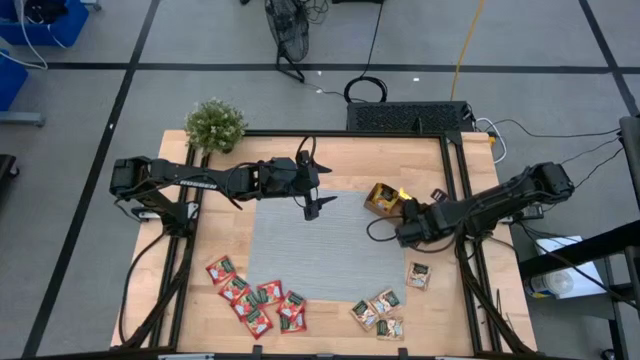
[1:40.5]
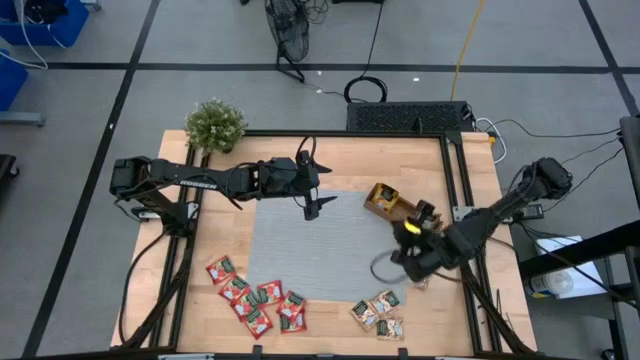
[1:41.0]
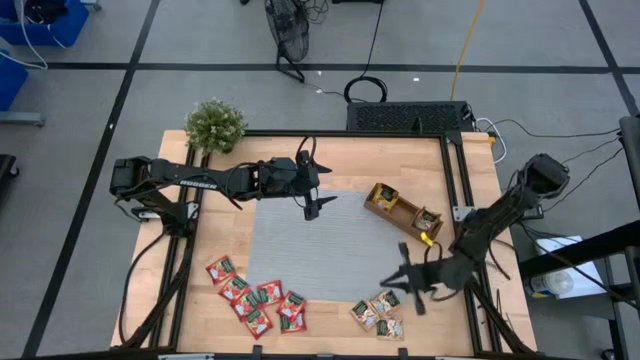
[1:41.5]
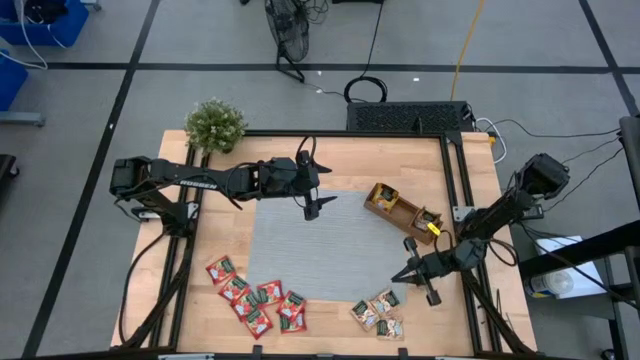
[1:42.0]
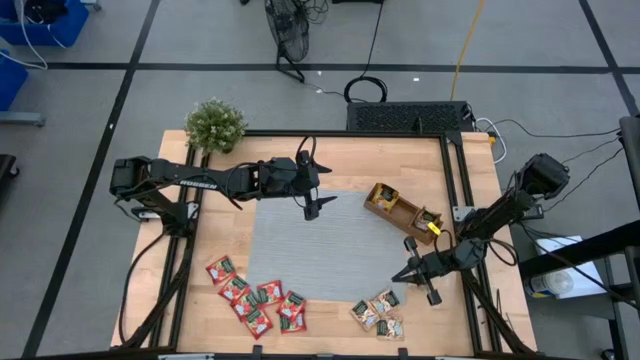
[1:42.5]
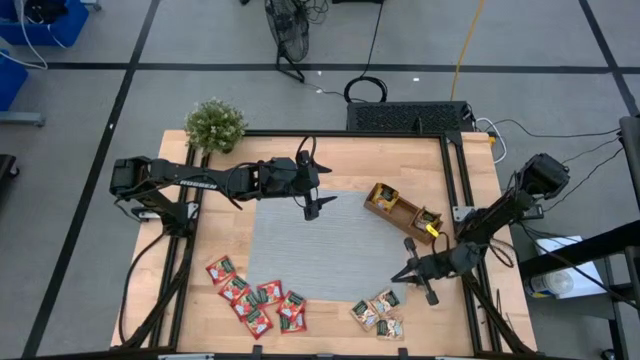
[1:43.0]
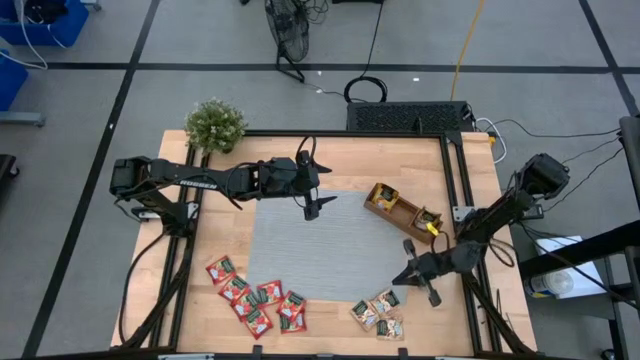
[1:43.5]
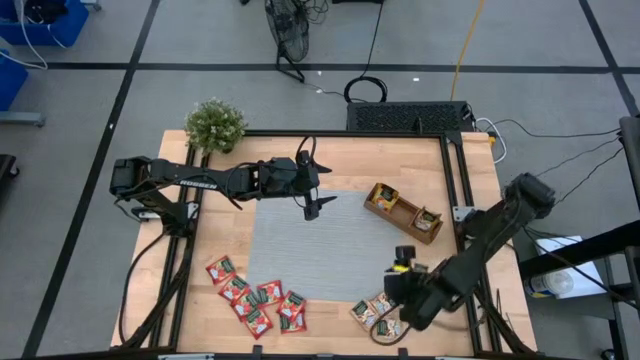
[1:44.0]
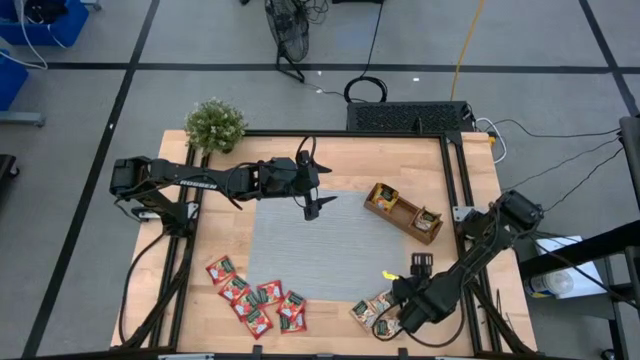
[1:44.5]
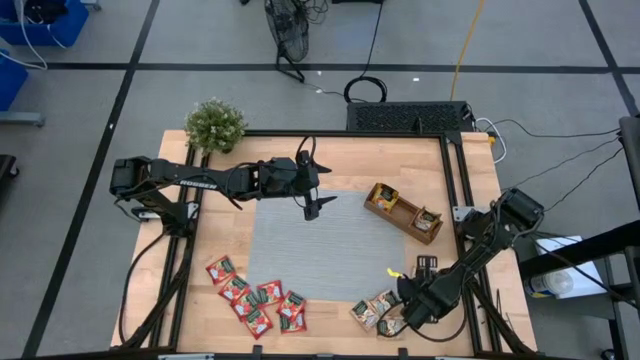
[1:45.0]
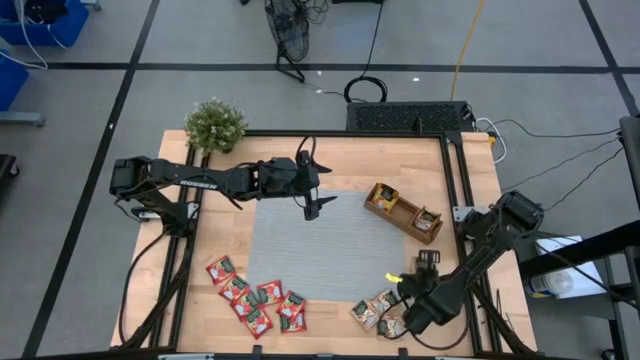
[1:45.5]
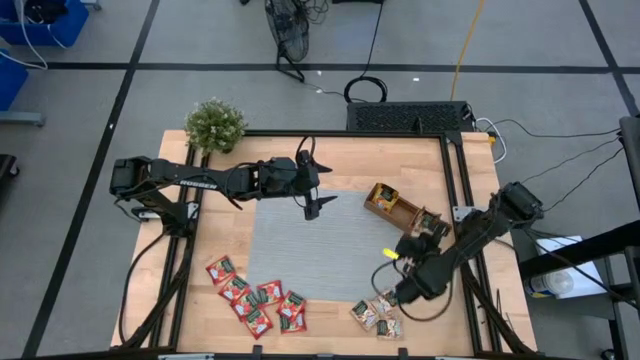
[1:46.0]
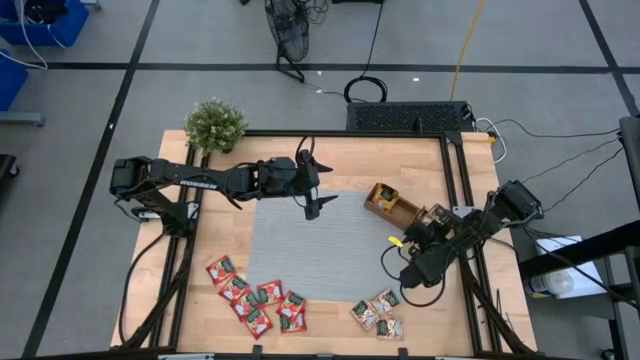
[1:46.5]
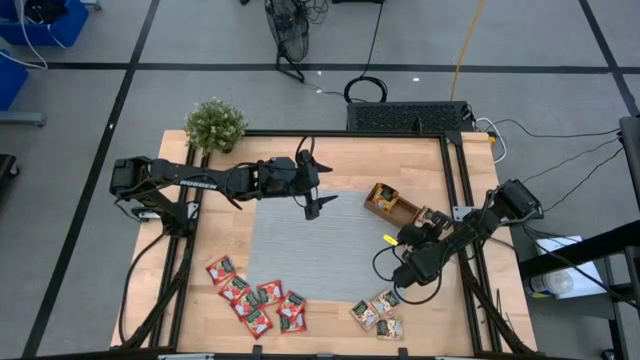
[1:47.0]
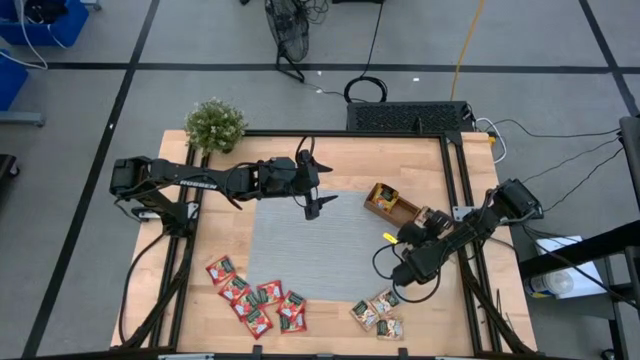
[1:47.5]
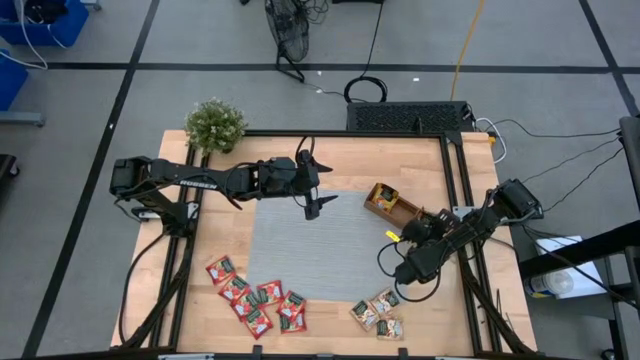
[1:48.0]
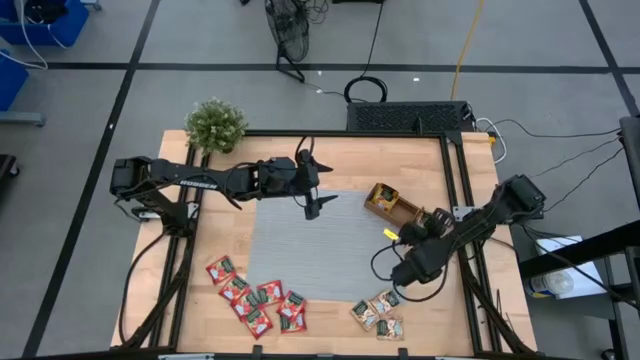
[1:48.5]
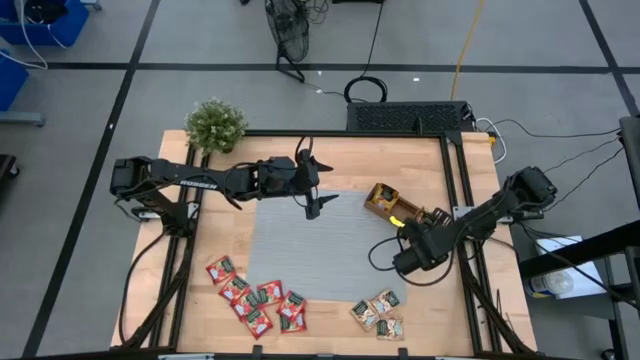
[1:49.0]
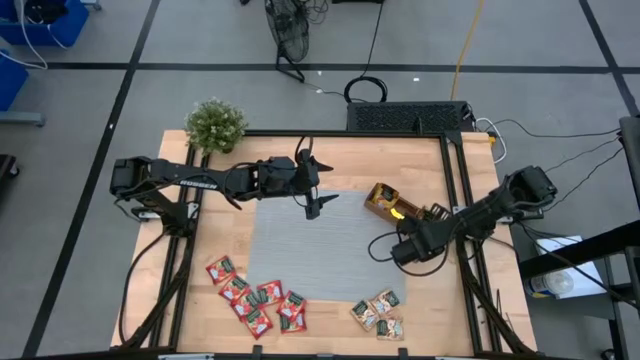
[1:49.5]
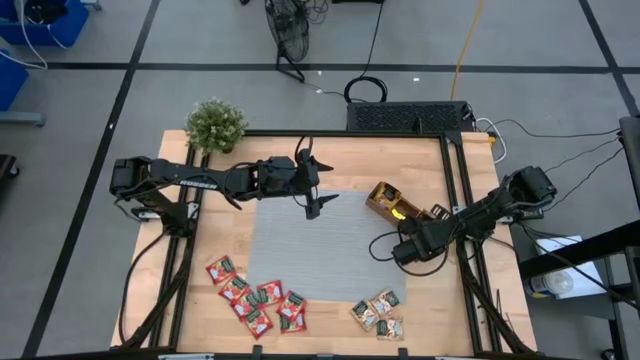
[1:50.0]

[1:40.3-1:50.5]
Task: Pick & Place Tea
Put the brown tea bag into the right section of the wooden organizer

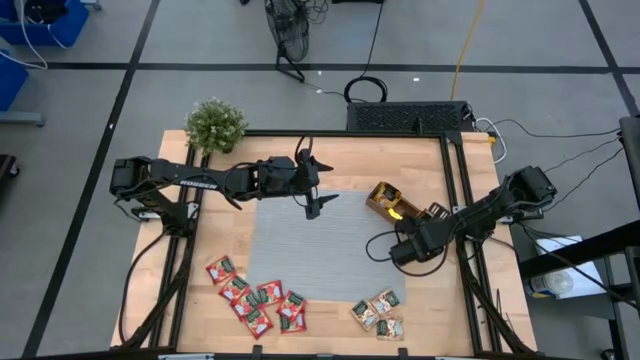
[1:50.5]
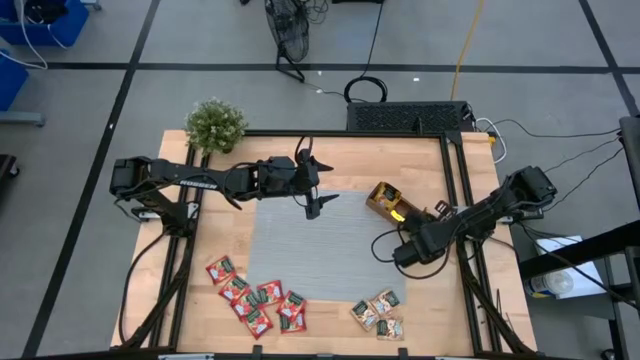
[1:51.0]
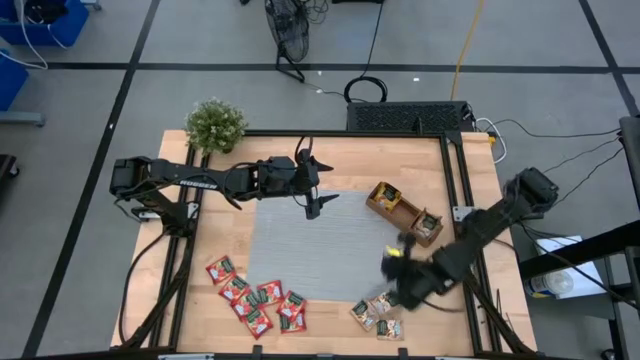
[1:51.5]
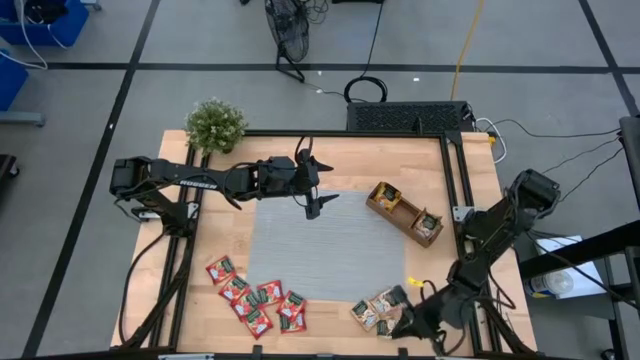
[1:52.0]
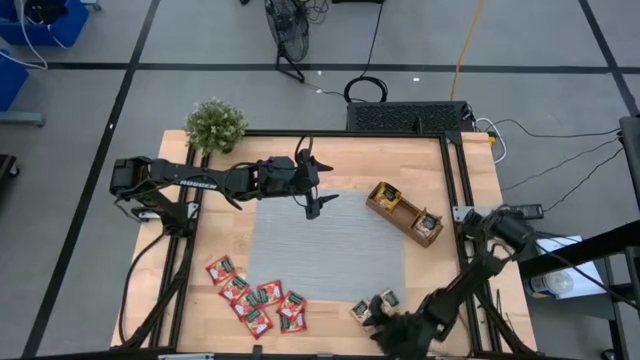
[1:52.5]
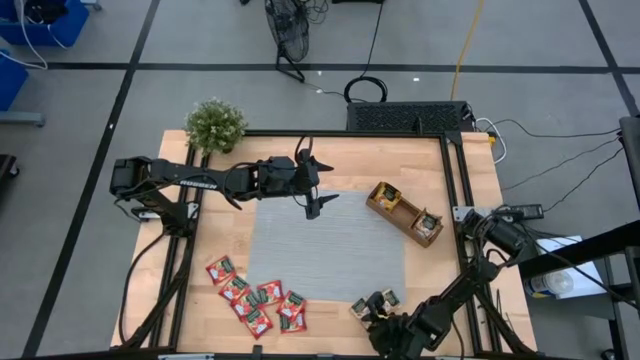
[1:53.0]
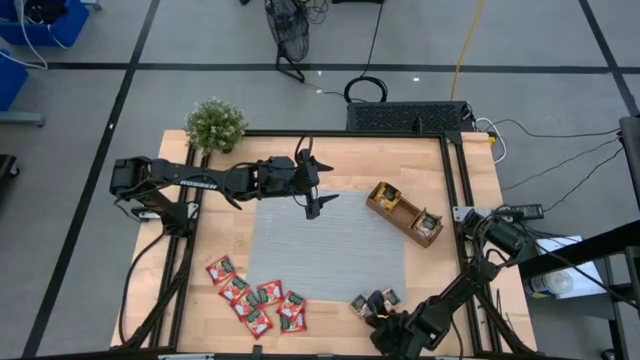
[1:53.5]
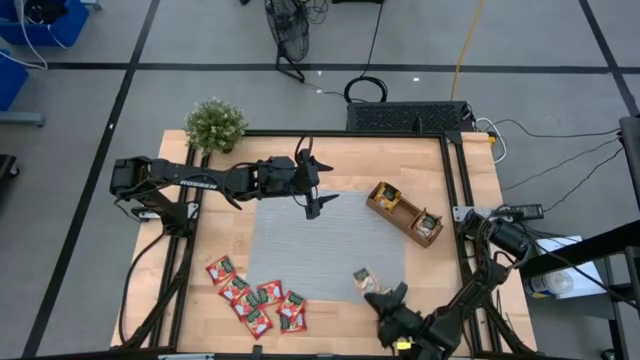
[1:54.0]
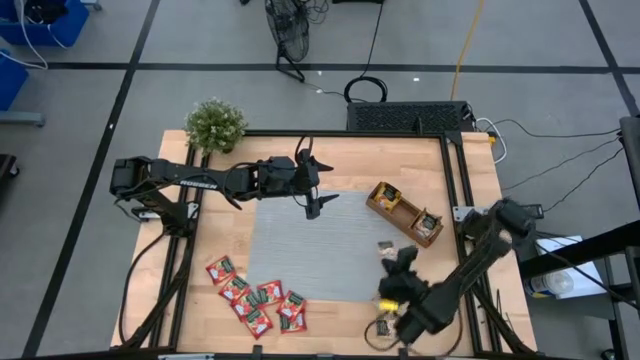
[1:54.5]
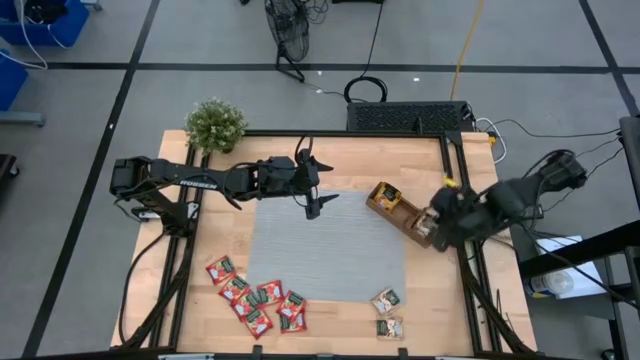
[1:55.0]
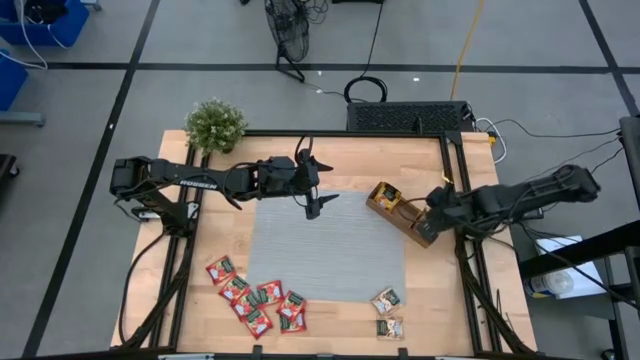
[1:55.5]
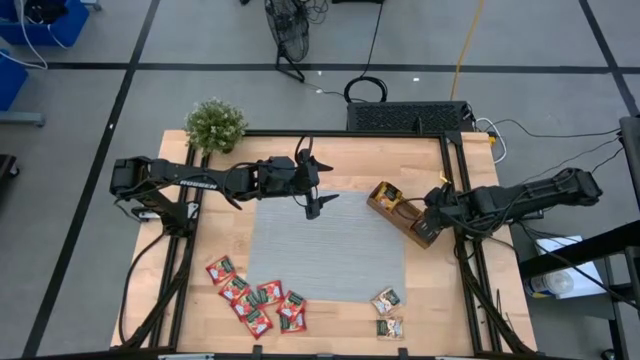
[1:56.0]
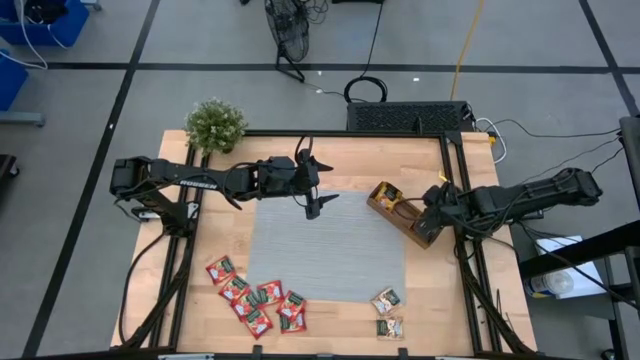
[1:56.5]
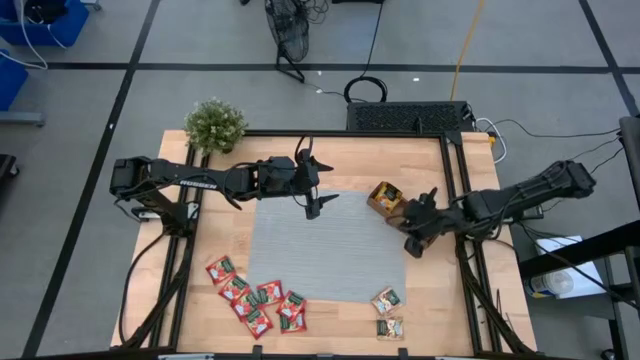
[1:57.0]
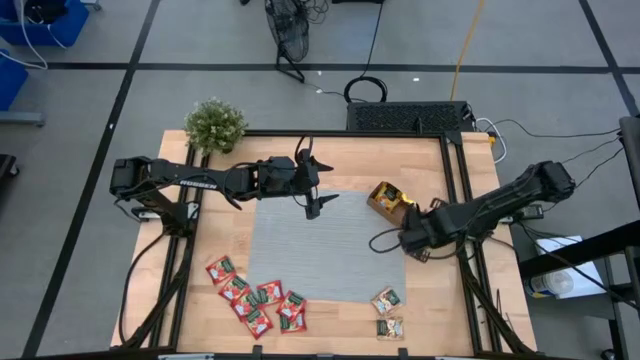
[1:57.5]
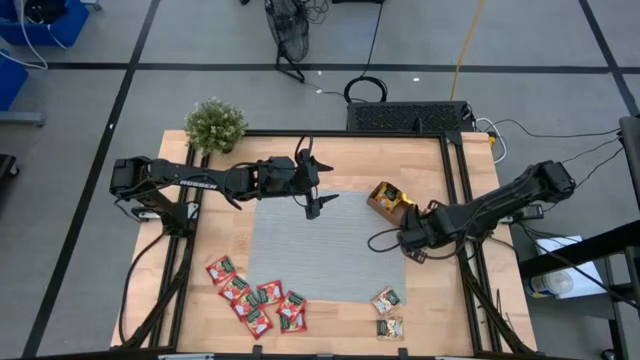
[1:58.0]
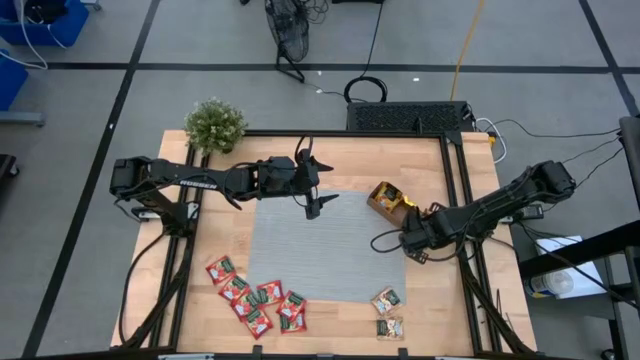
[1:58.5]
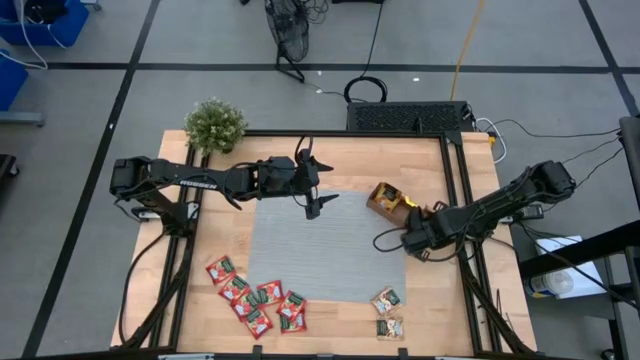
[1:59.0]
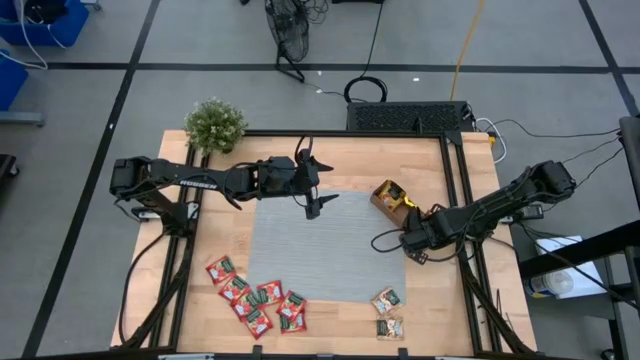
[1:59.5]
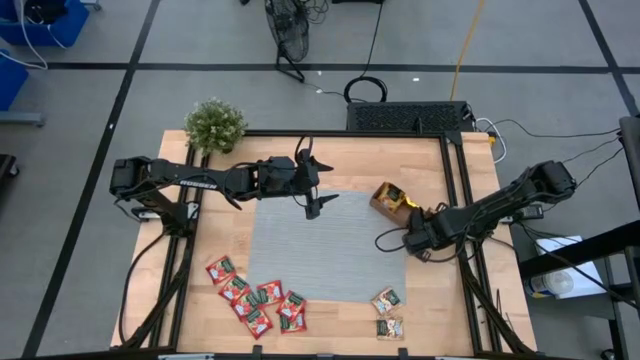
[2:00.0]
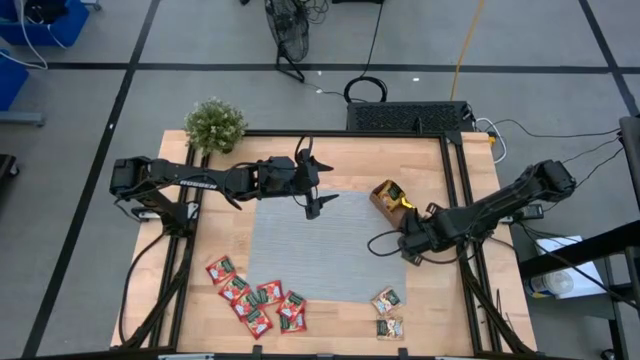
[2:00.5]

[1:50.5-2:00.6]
Put the brown tea bag into the right section of the wooden organizer
